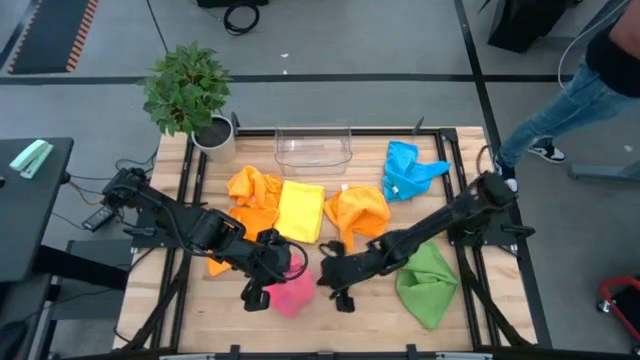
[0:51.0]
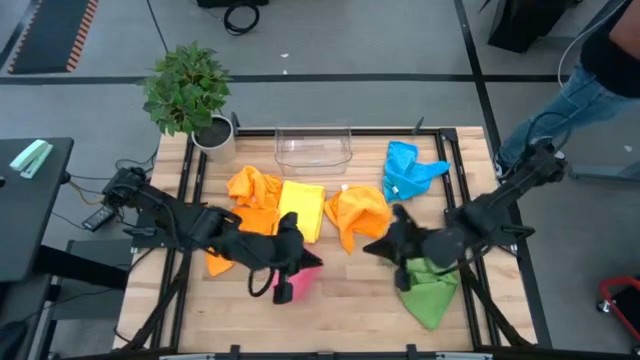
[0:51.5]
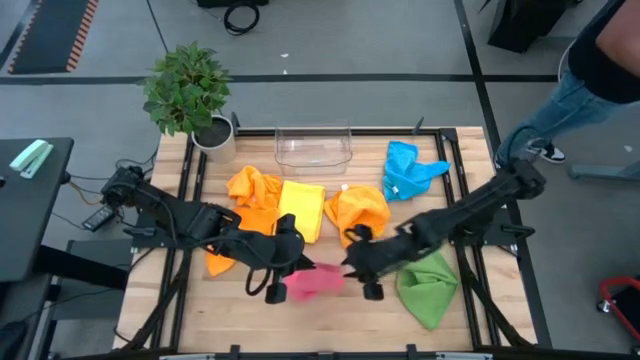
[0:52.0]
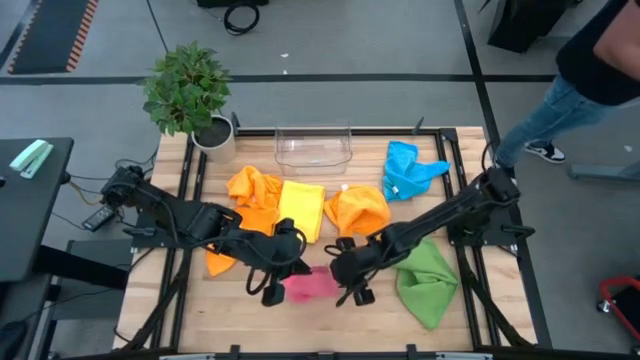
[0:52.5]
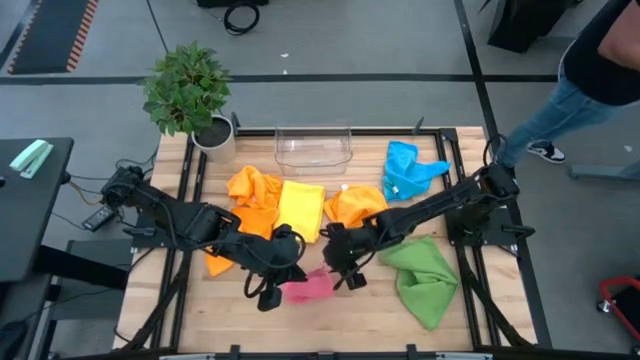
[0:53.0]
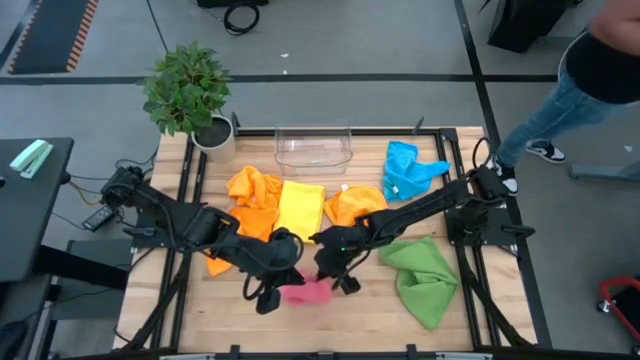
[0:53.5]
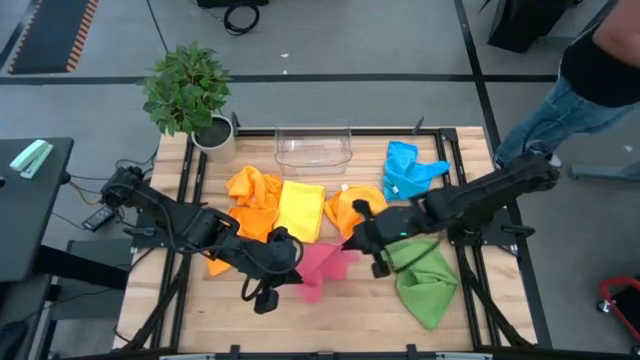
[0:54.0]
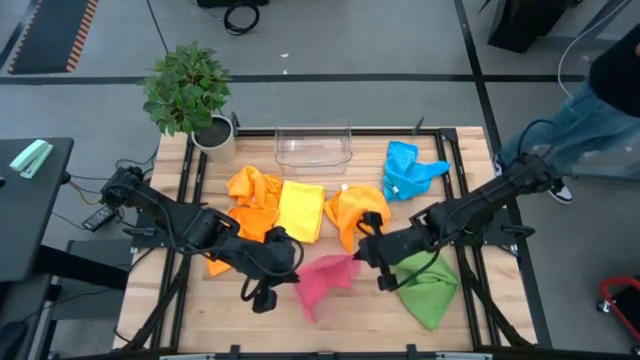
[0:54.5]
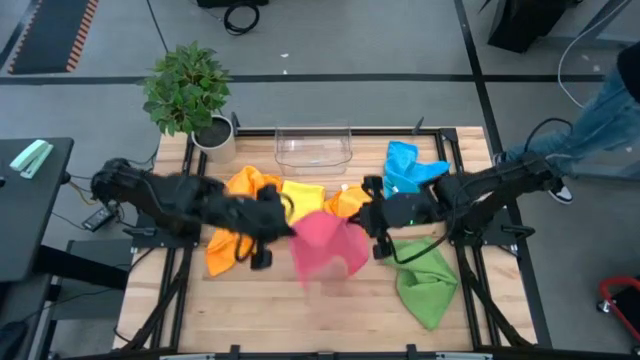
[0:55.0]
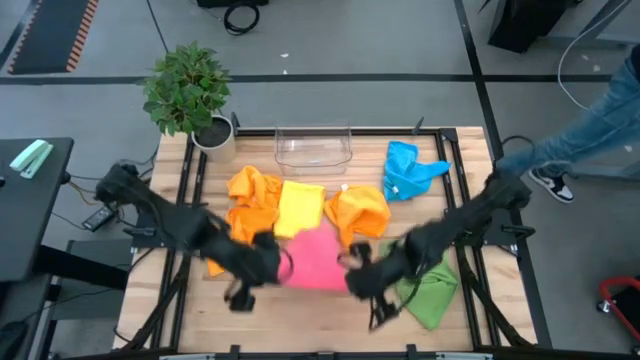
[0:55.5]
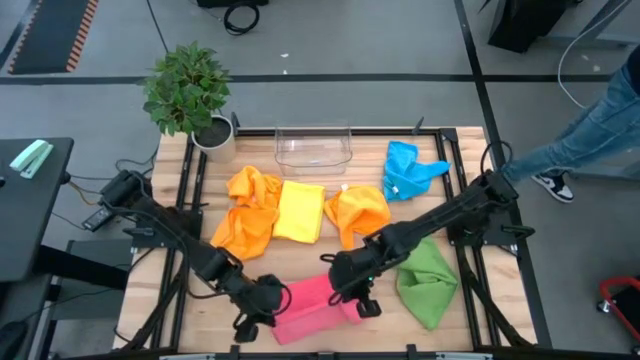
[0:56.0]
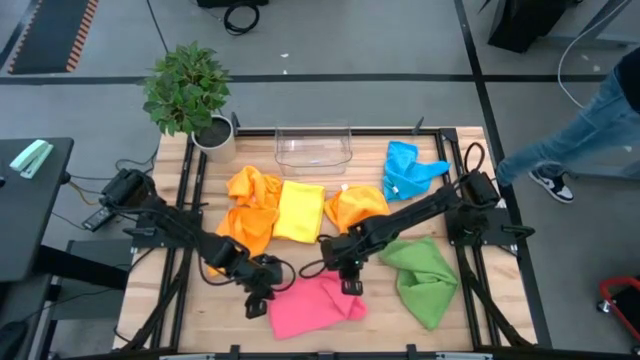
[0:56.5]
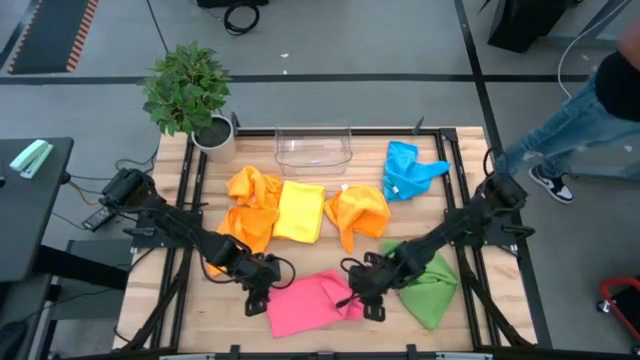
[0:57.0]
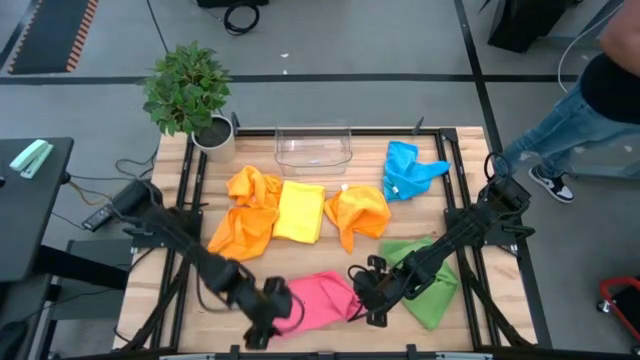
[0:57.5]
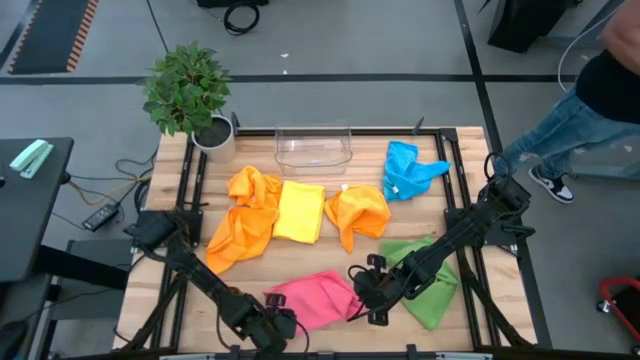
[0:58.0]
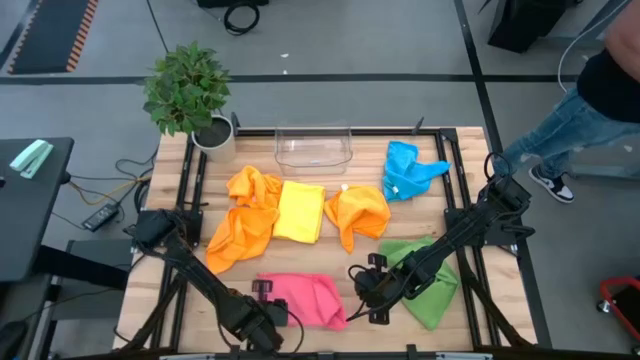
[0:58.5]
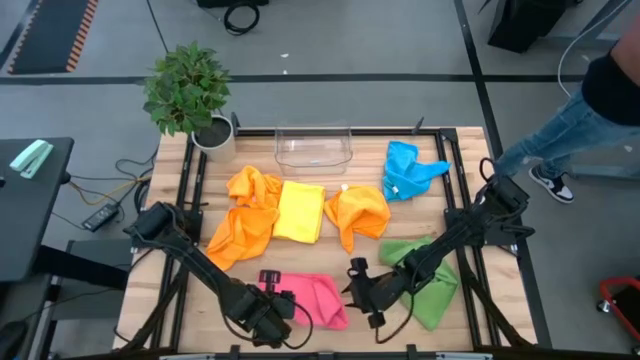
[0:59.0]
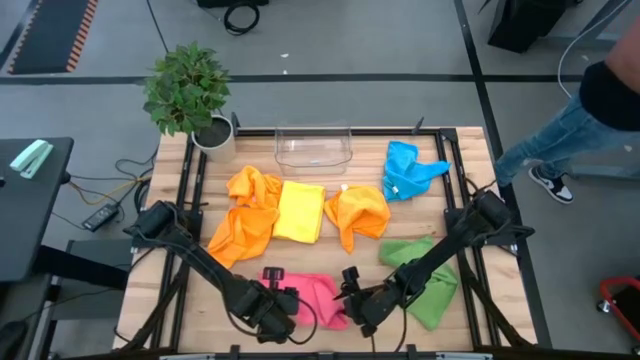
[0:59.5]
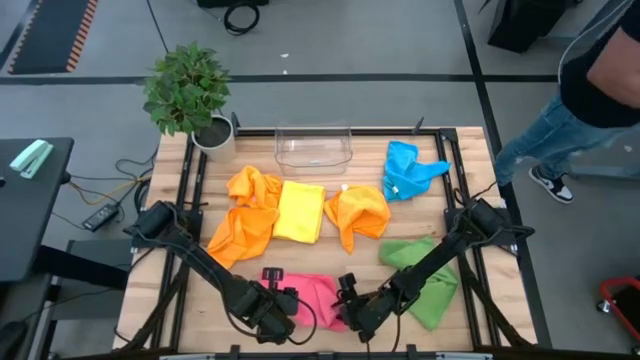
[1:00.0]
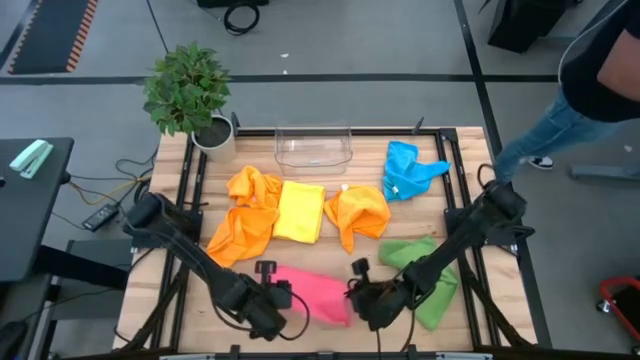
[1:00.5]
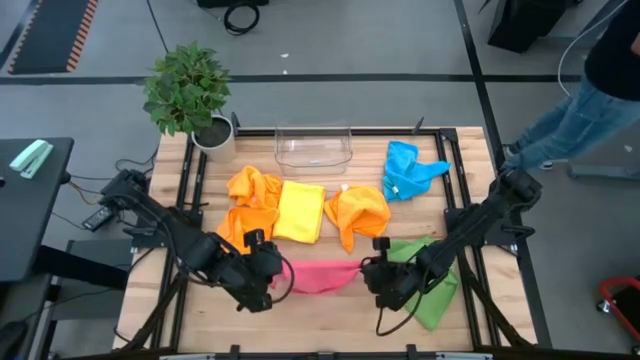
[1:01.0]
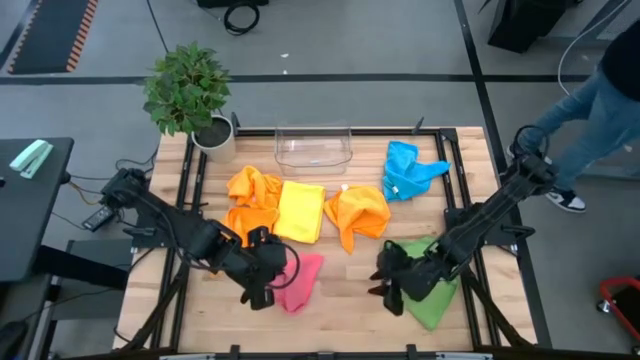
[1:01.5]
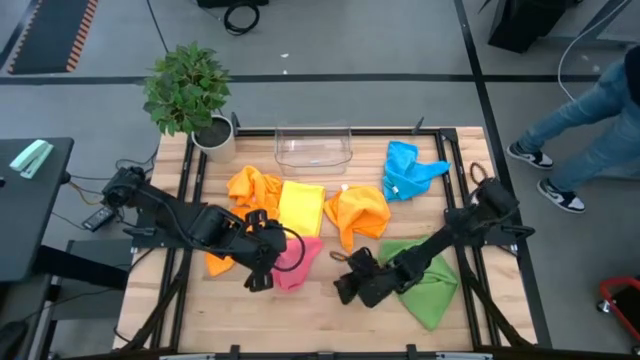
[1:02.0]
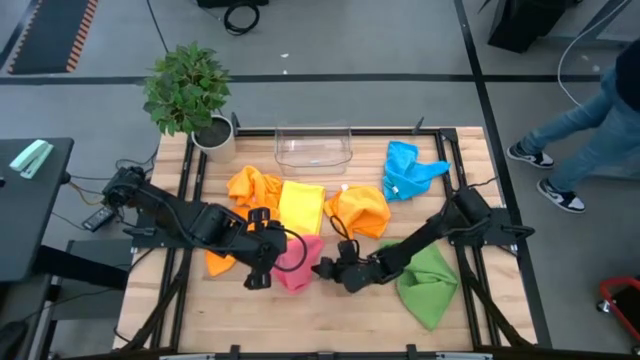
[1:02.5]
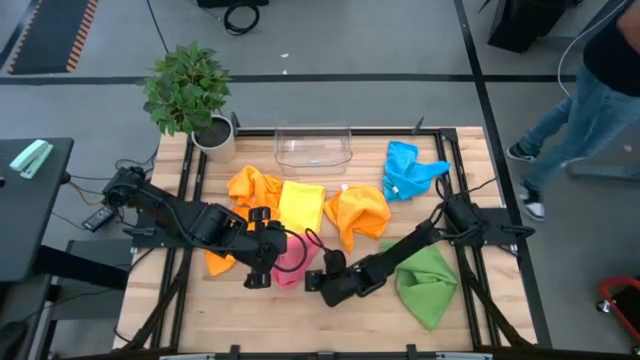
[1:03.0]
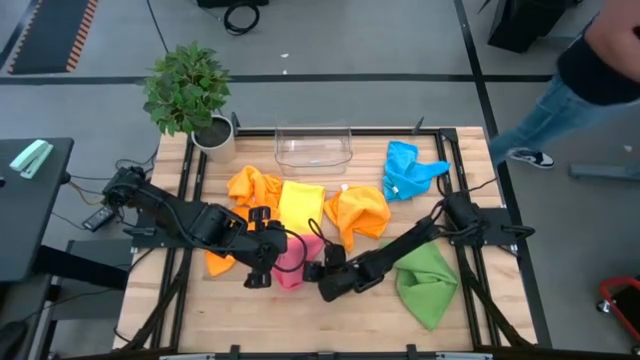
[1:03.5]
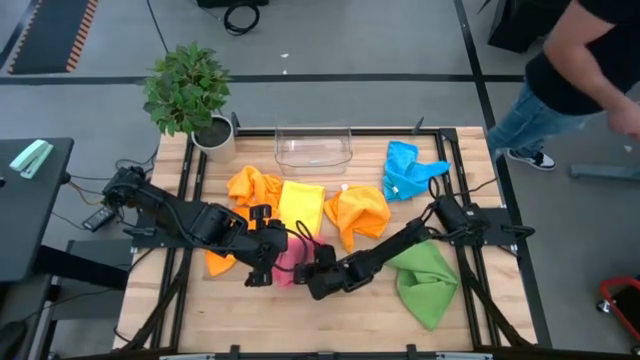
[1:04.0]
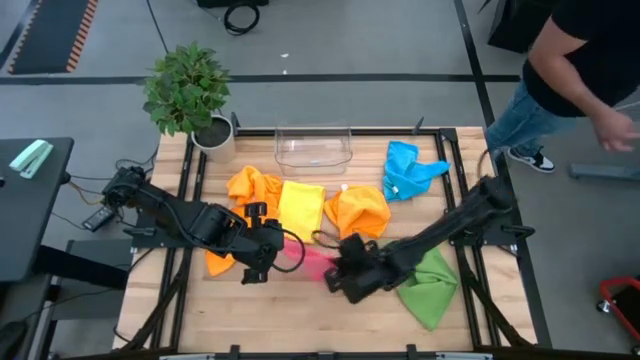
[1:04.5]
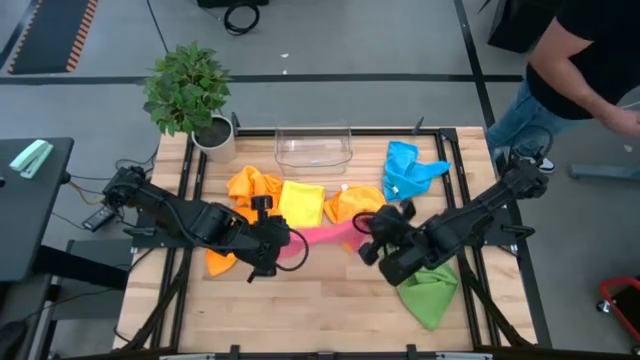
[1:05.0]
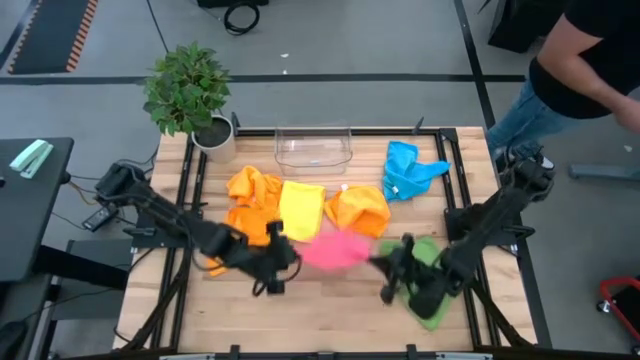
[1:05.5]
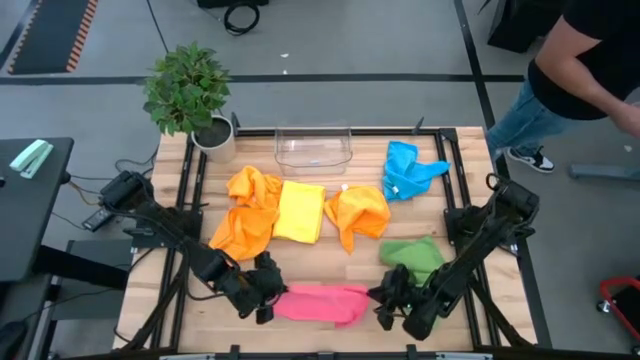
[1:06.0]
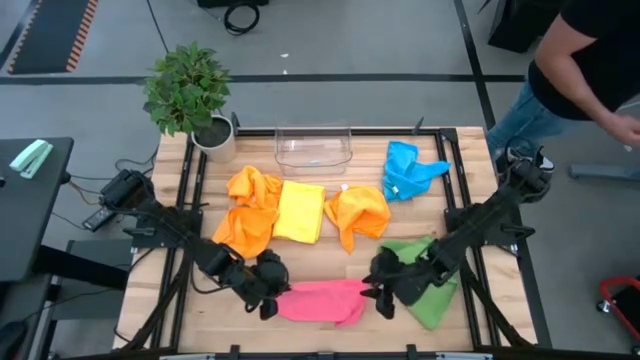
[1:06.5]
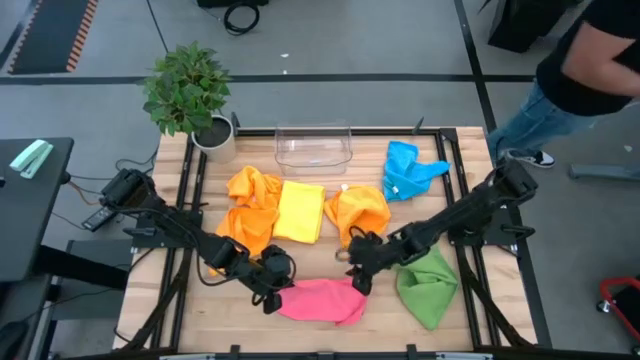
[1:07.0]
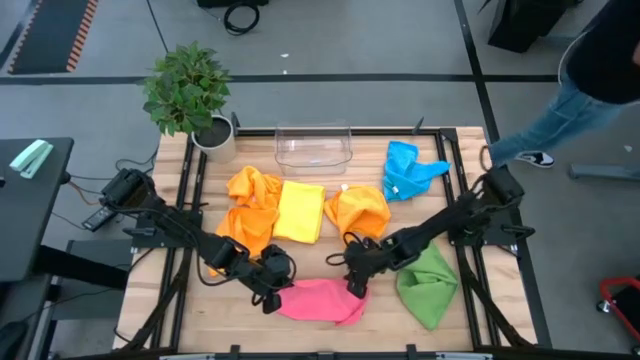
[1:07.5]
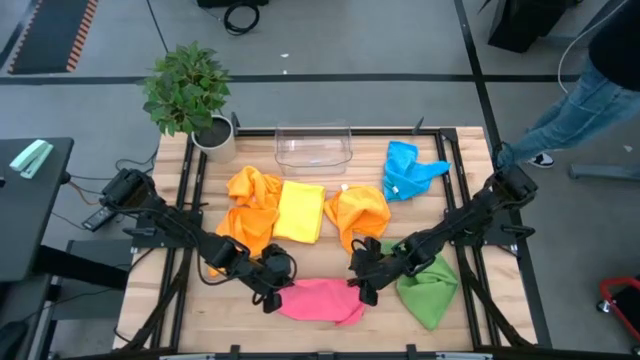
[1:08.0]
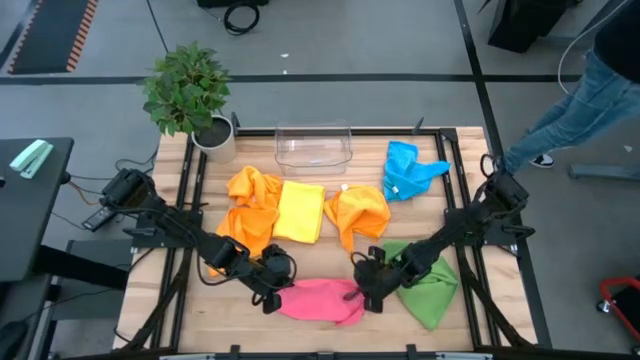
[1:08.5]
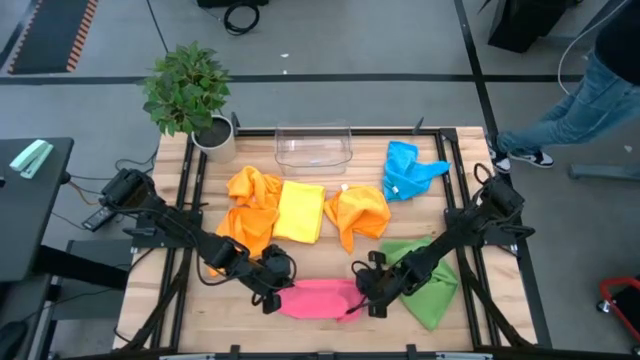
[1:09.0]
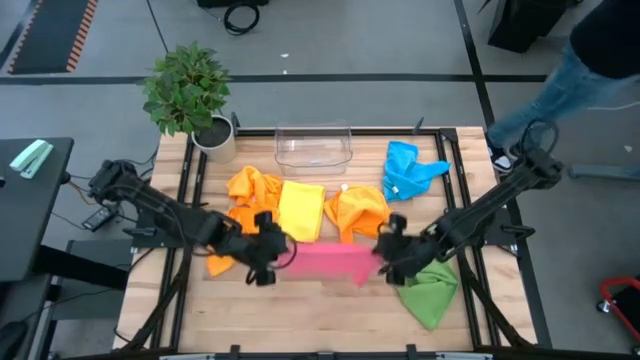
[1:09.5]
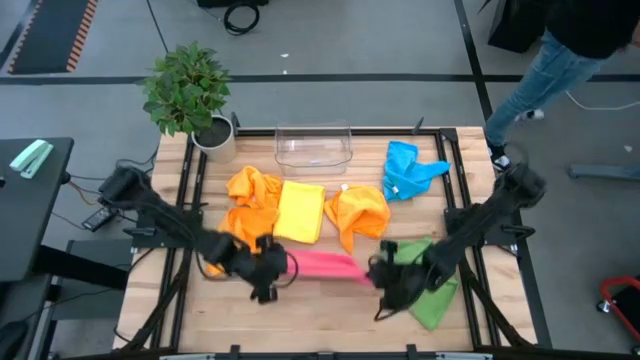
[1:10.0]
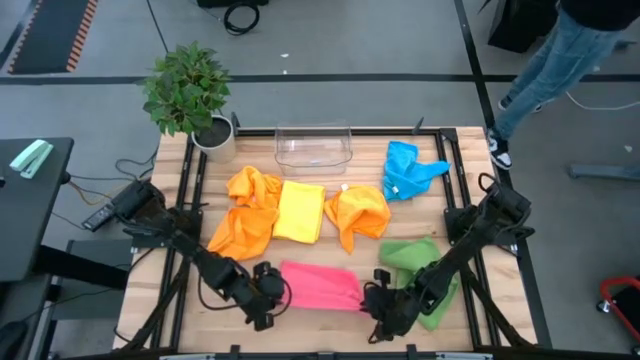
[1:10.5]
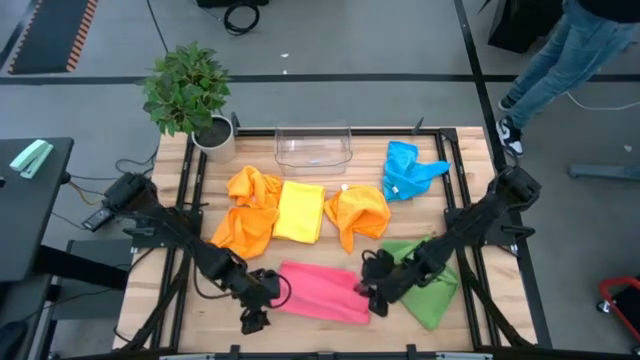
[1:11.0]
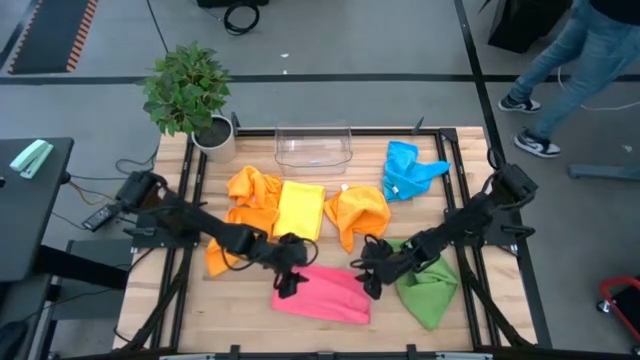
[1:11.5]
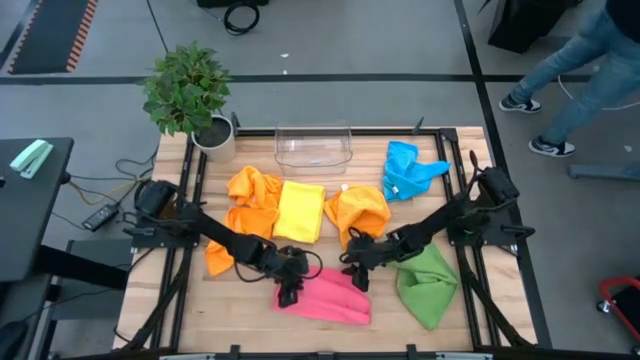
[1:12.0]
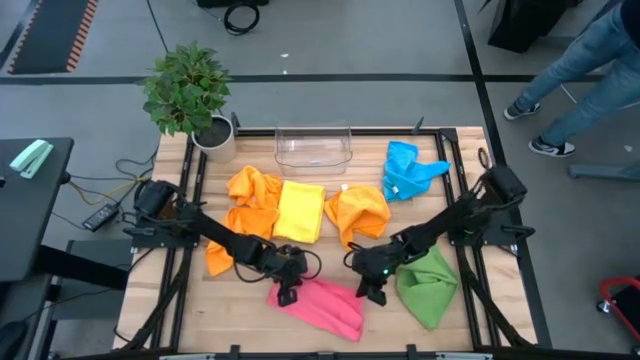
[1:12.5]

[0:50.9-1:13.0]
Task: Fold microfiber towels
Fold the pink microfiber cloth
